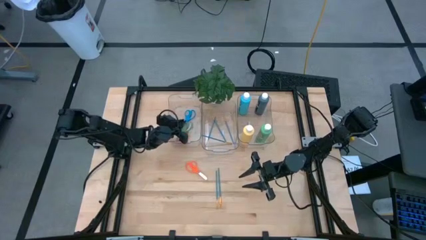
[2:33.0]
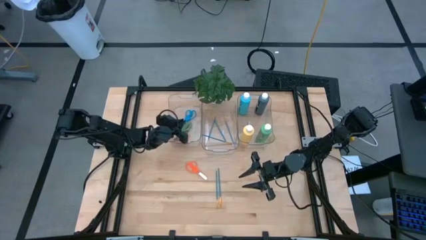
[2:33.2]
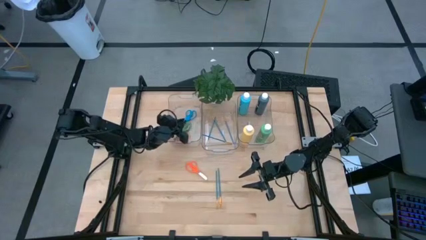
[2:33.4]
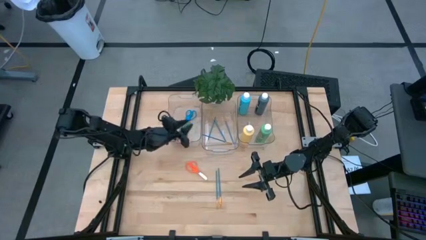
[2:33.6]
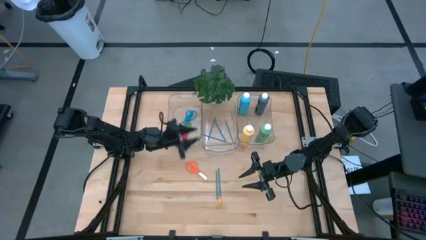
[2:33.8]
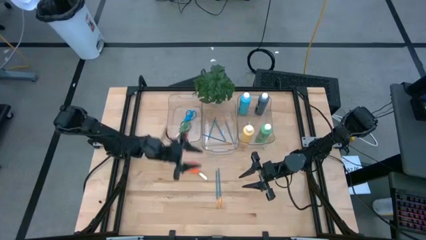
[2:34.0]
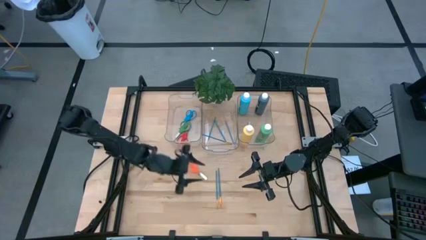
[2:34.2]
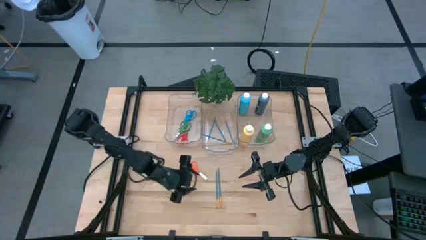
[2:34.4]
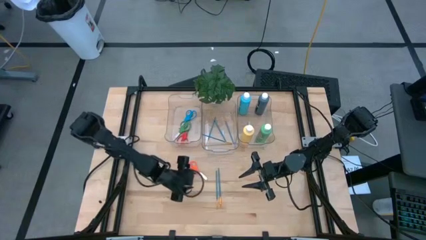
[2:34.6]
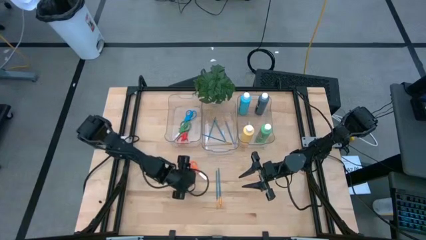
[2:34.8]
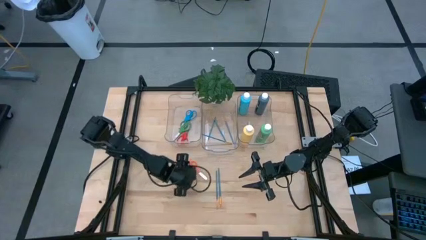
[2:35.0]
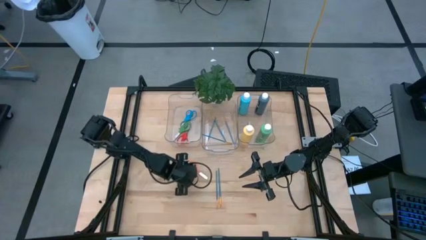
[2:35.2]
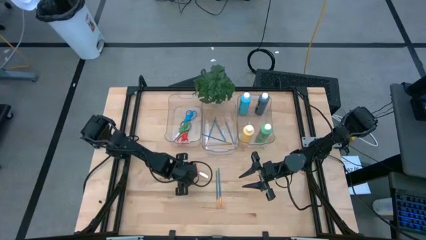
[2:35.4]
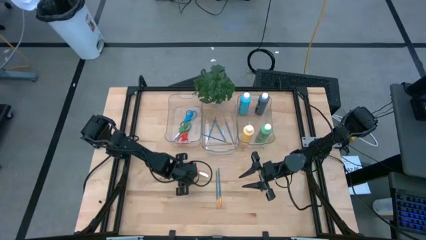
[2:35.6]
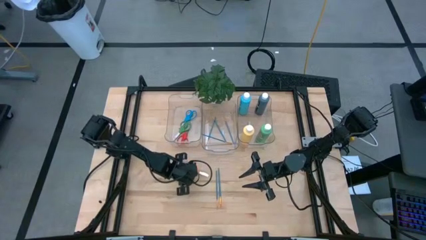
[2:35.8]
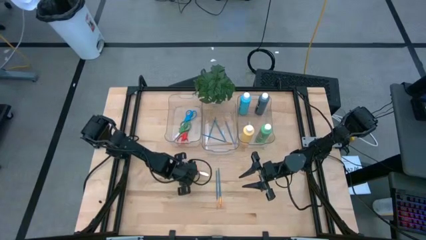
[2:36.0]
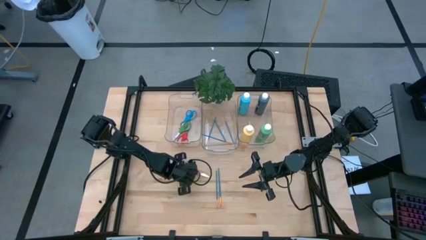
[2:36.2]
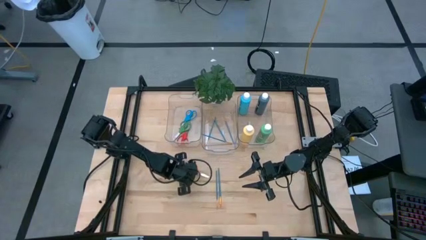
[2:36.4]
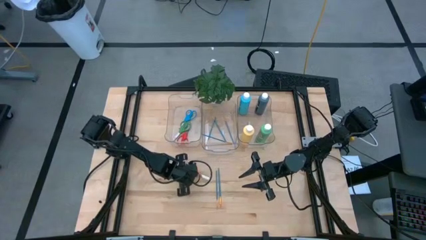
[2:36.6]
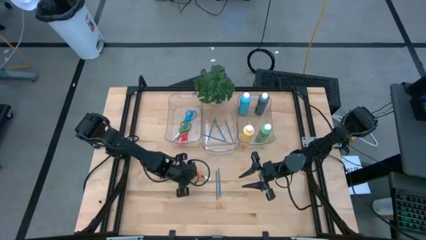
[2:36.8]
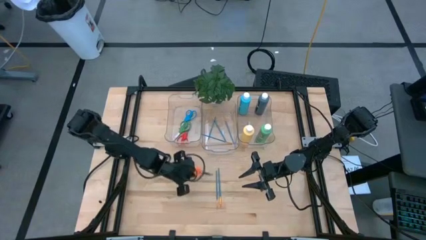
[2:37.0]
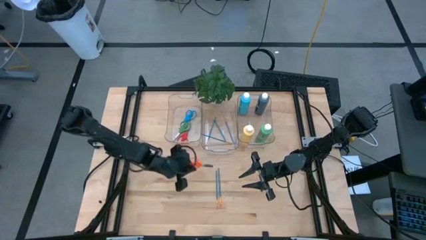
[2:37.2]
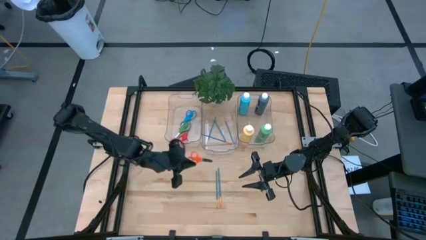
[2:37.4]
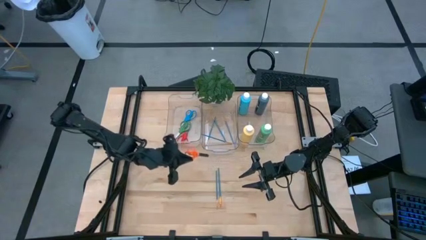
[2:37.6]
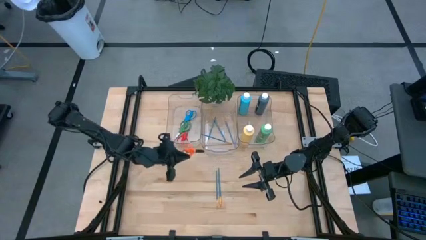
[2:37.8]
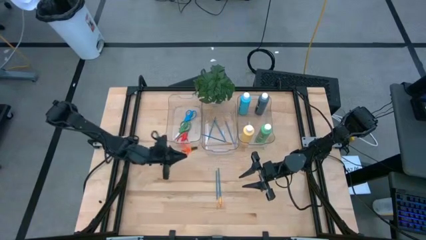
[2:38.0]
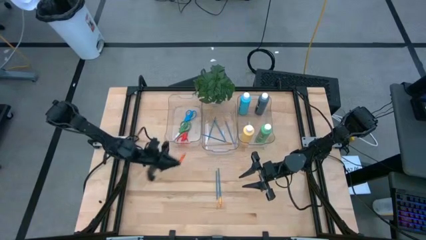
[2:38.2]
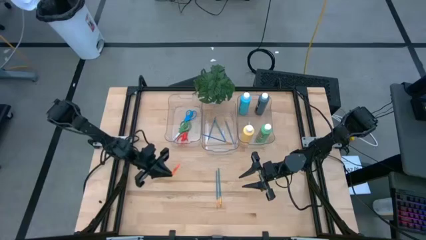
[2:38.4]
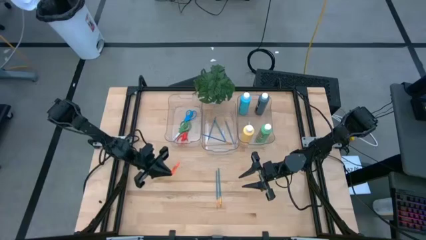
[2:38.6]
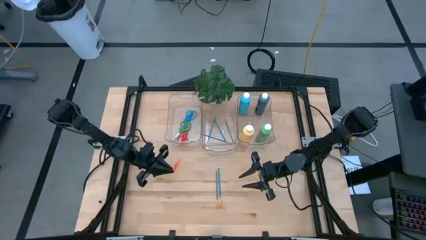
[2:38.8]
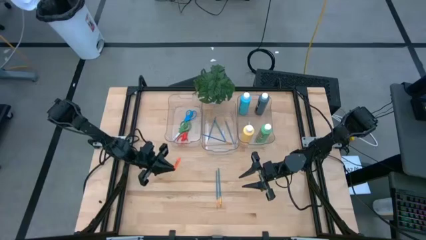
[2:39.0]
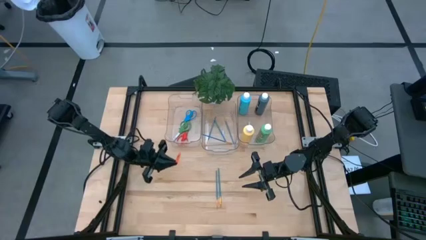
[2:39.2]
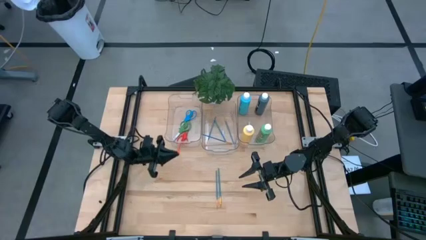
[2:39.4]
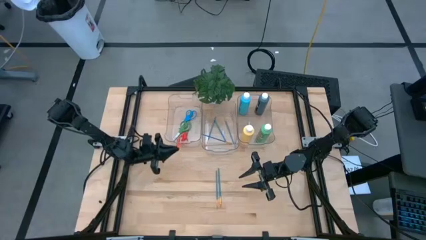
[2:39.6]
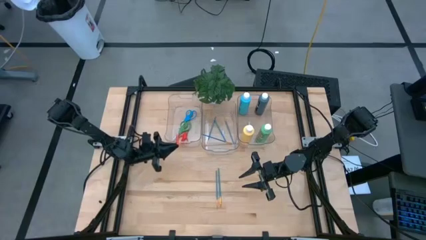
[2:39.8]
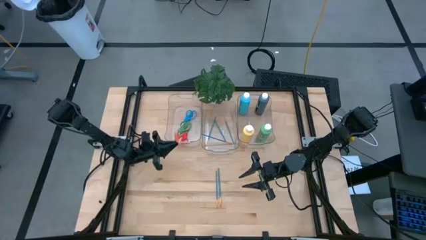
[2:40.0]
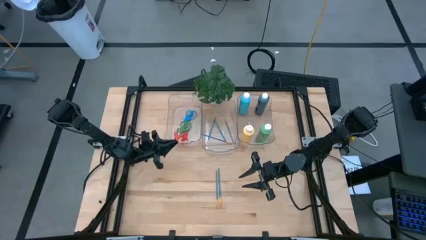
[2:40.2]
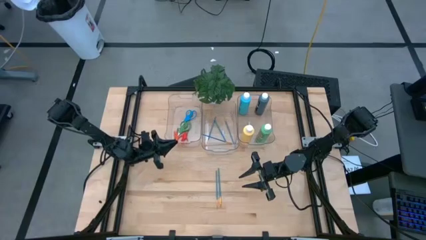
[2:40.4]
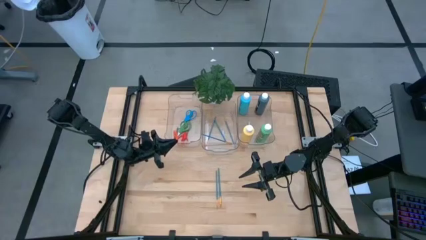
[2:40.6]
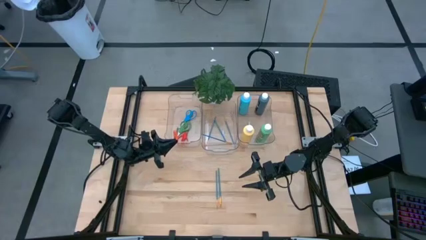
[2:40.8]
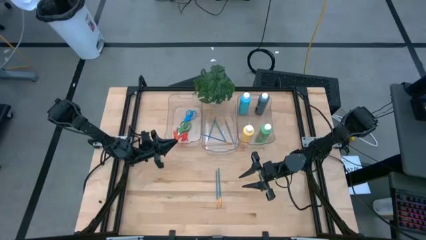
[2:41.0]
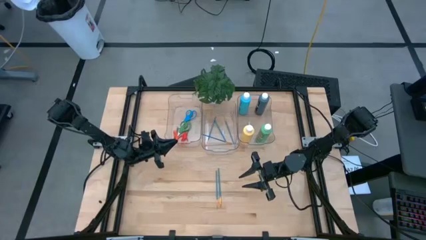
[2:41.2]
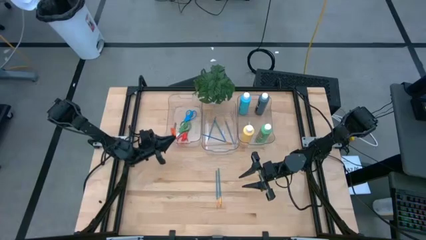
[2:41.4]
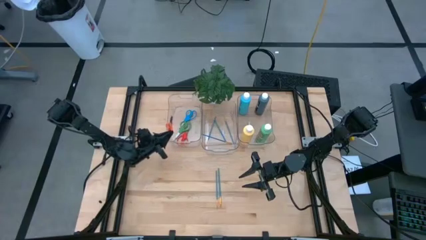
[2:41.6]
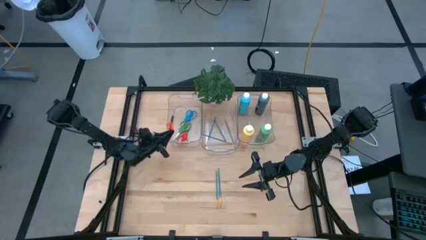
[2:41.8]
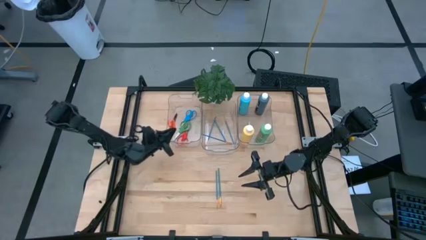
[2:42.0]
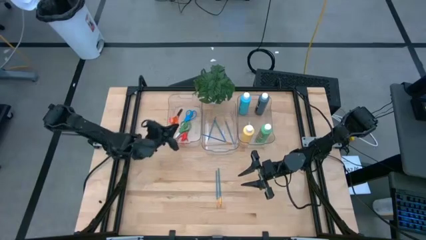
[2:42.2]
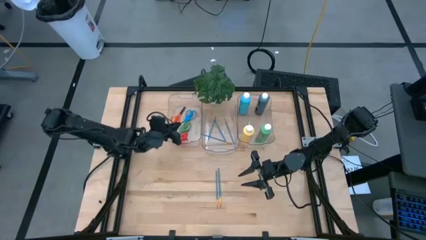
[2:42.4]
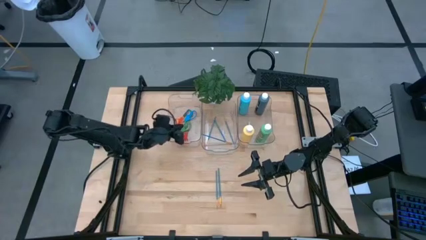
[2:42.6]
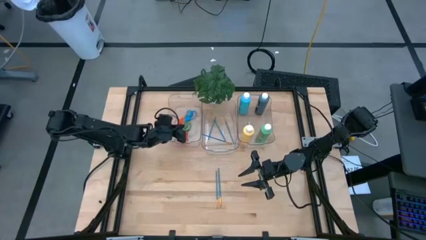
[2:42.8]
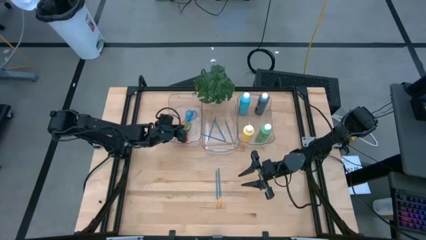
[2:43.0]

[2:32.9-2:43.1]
Task: Pick & Place Paint Supplies
Put the orange scissors into the left transparent bin

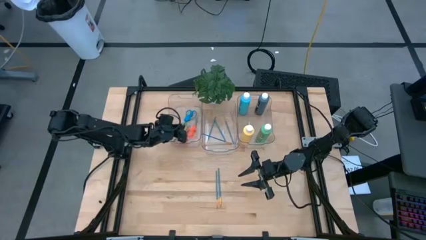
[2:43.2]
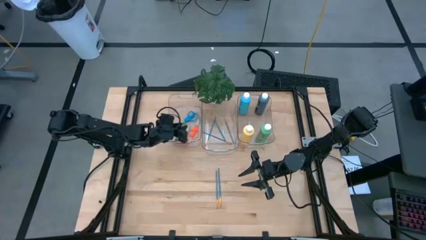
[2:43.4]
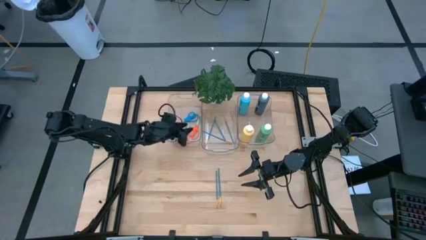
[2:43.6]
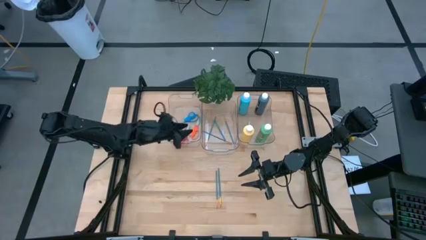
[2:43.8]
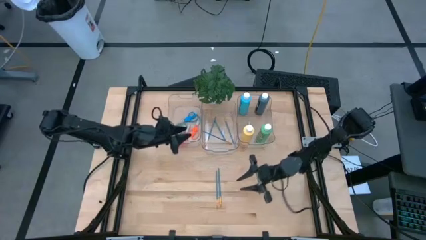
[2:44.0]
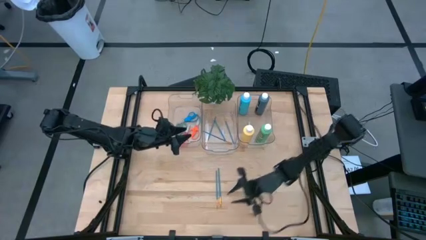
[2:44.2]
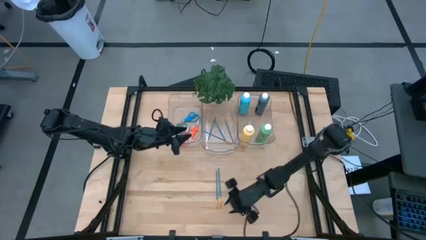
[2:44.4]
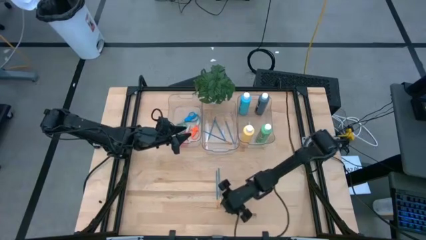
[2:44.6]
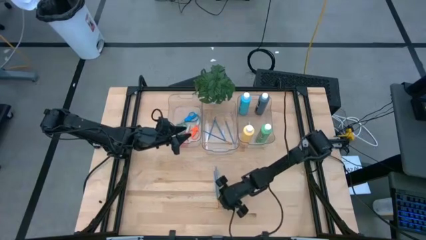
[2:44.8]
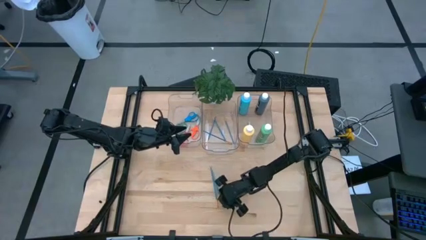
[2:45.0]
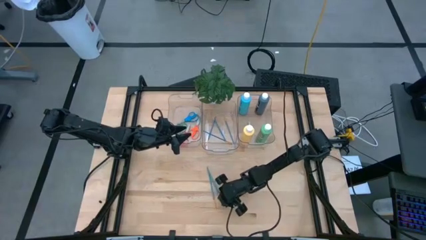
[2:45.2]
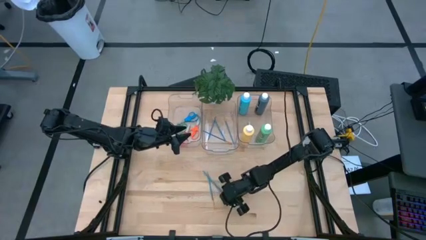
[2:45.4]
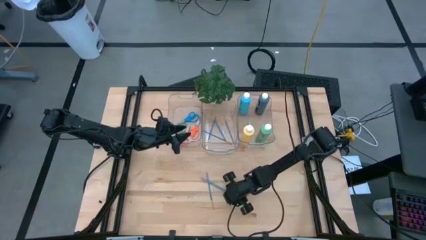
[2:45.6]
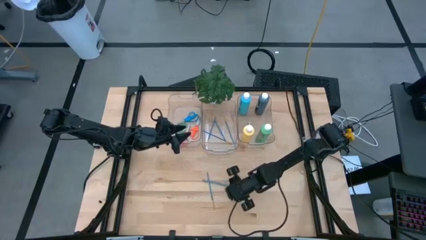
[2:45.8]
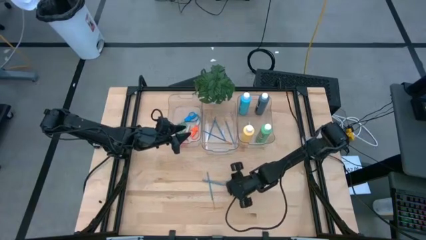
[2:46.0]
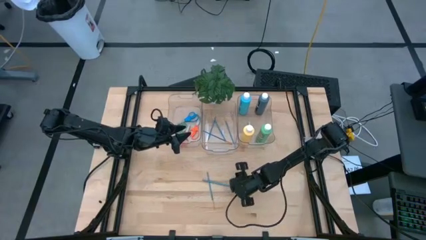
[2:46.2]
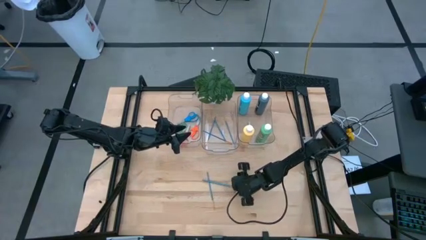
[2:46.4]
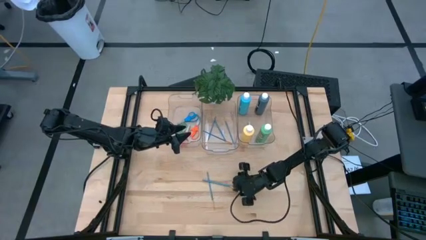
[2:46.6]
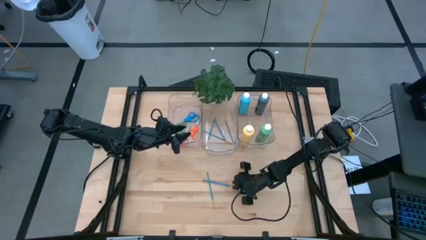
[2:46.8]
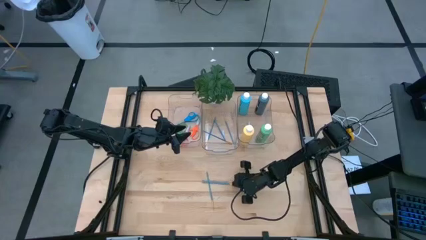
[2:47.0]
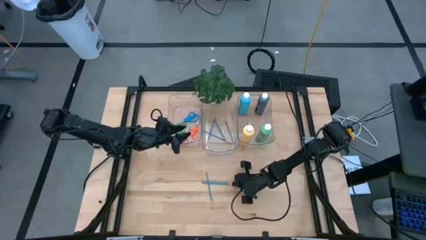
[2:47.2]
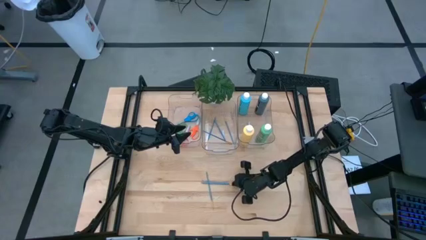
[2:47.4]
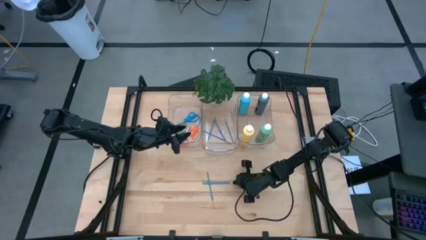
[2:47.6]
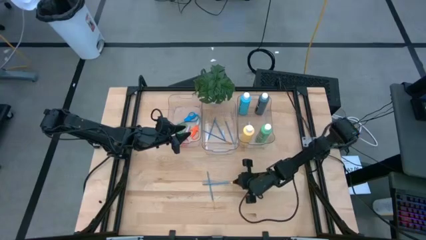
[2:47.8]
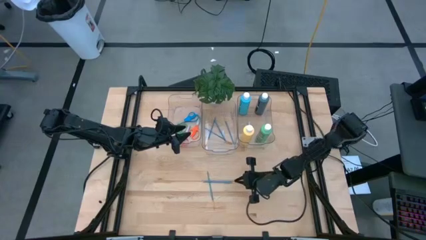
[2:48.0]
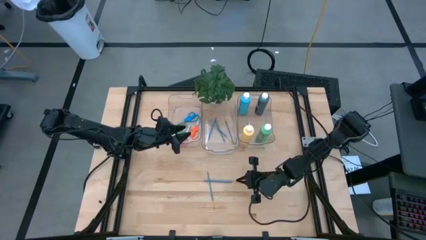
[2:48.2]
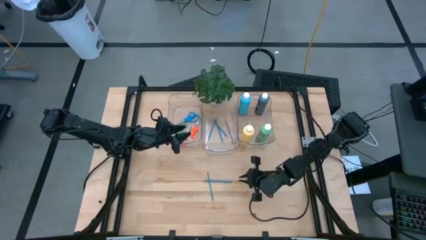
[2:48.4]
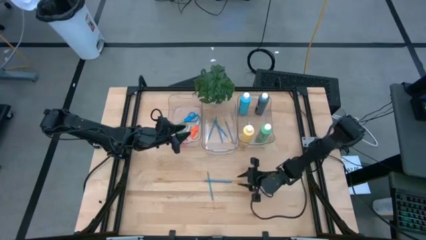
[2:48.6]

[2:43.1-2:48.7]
Put the blue paintbrush into the middle transparent bin
